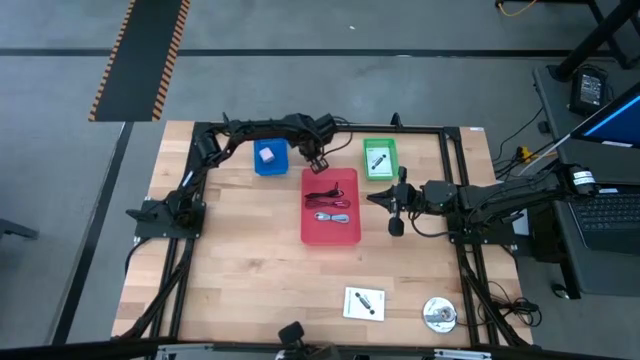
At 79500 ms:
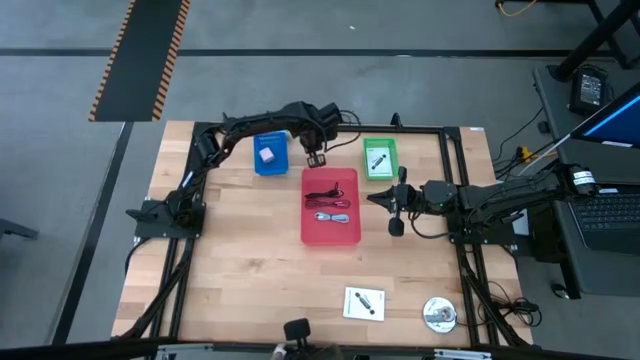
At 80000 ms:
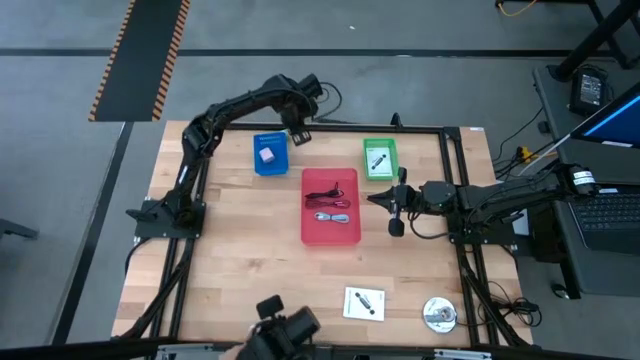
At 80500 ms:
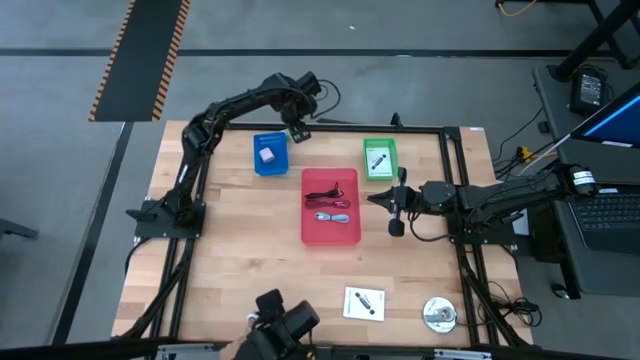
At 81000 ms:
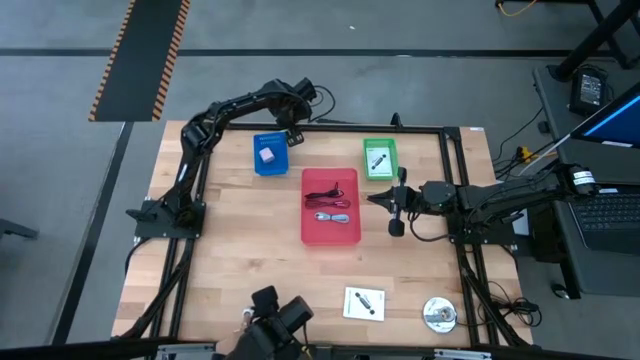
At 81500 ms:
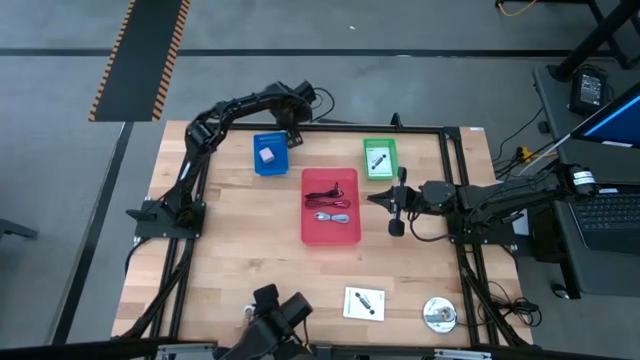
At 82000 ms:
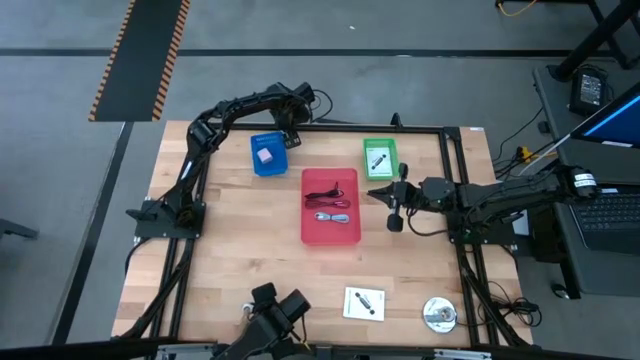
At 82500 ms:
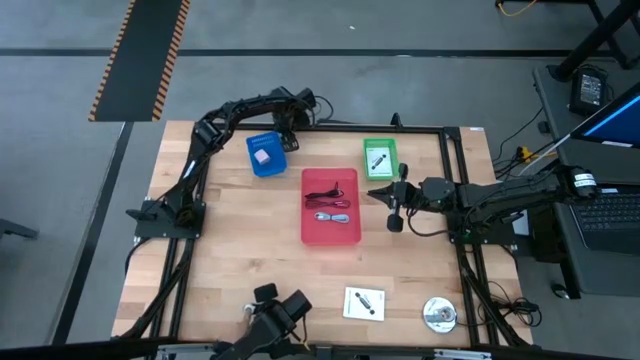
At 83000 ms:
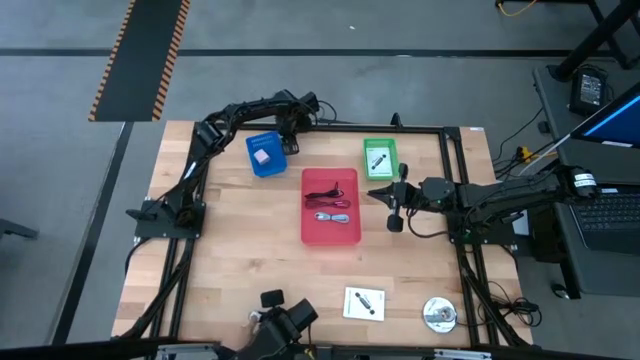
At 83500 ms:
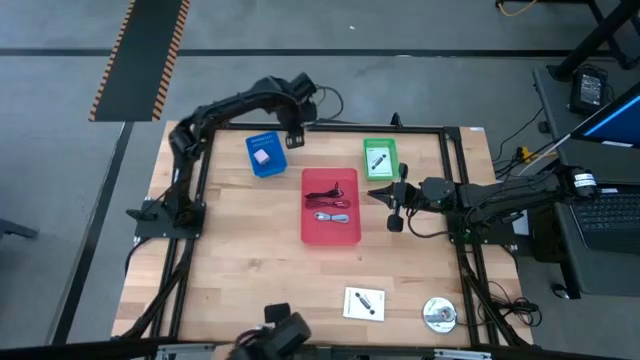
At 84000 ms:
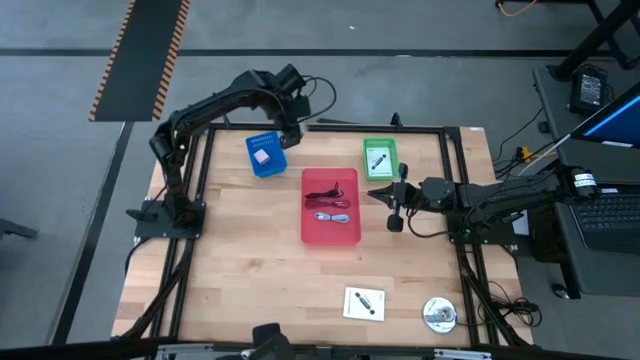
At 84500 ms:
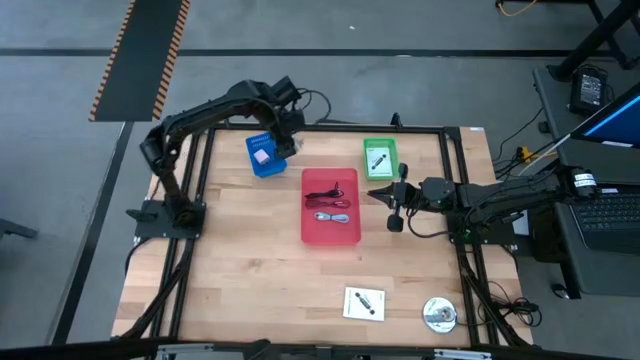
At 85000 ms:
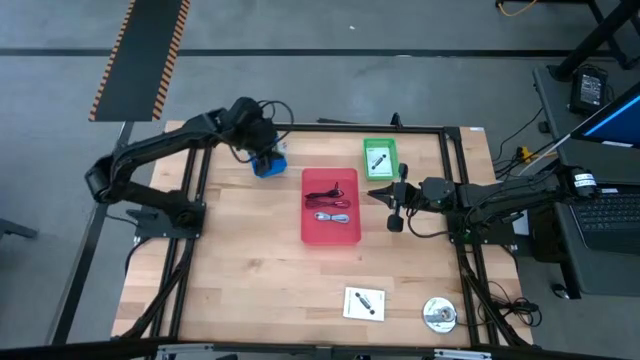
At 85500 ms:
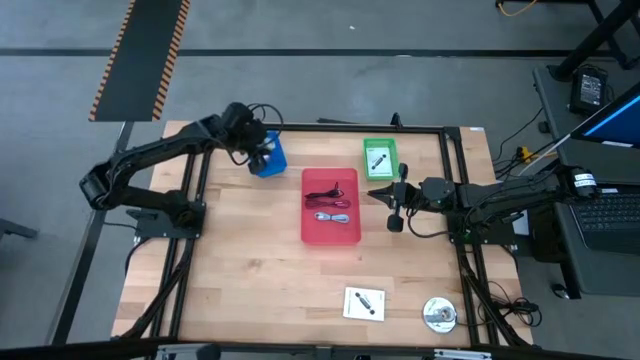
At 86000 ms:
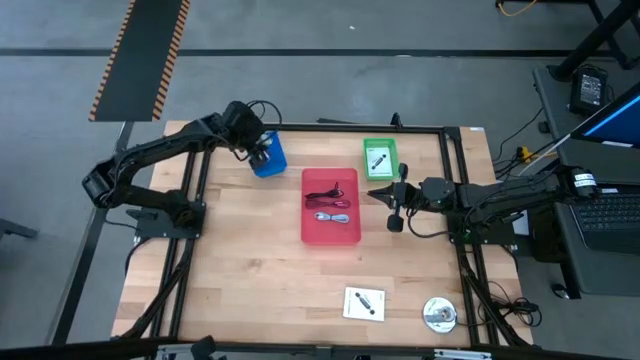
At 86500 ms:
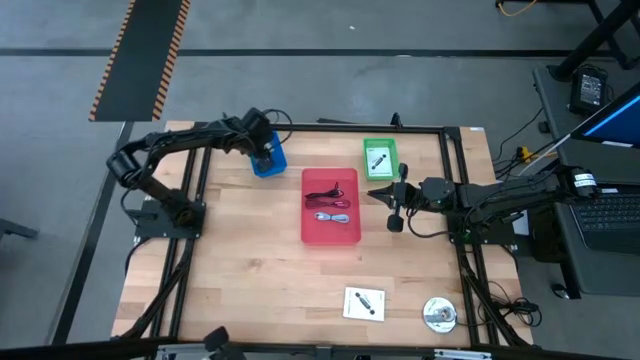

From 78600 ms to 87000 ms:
Task: Pick and place items into bin
Put the green charger adapter into the blue bin

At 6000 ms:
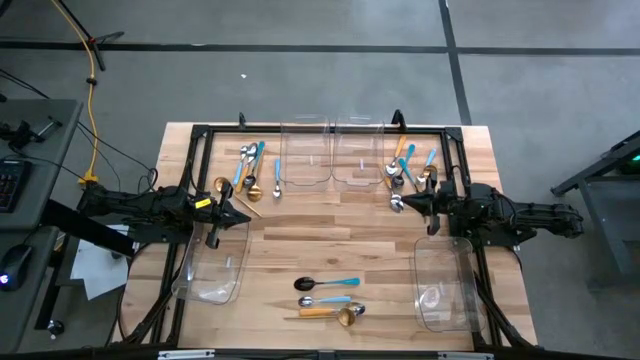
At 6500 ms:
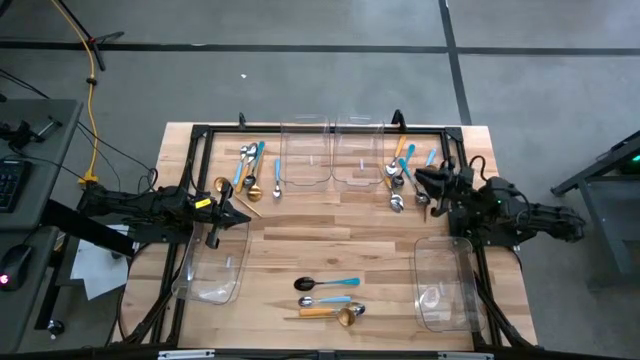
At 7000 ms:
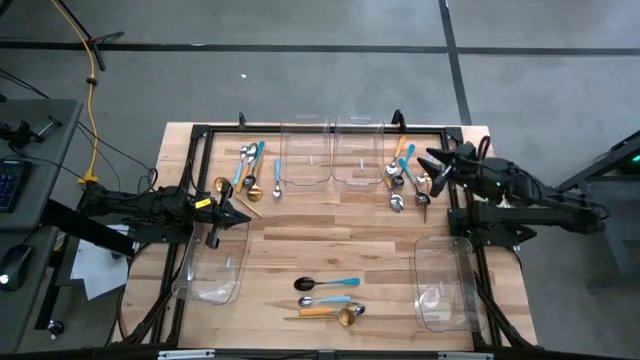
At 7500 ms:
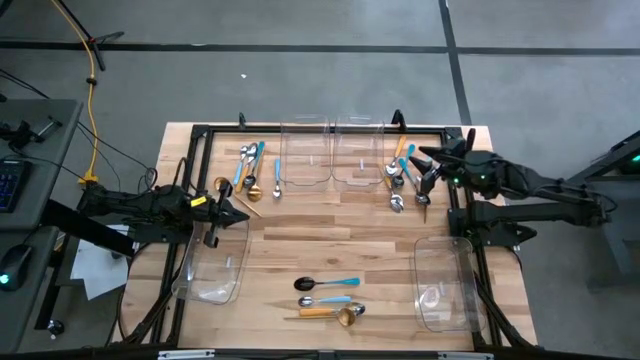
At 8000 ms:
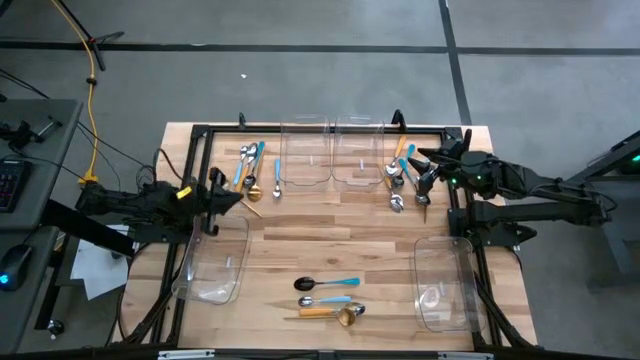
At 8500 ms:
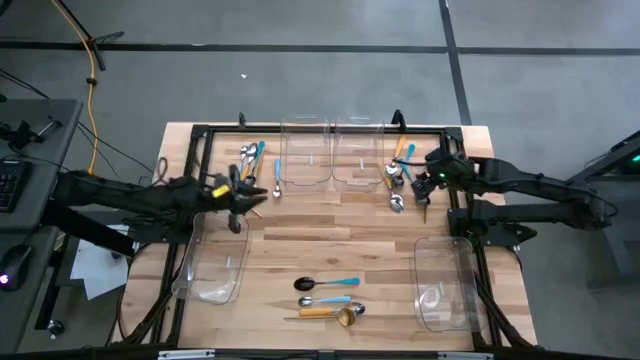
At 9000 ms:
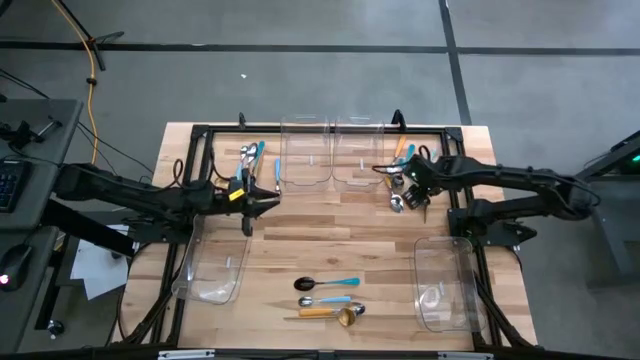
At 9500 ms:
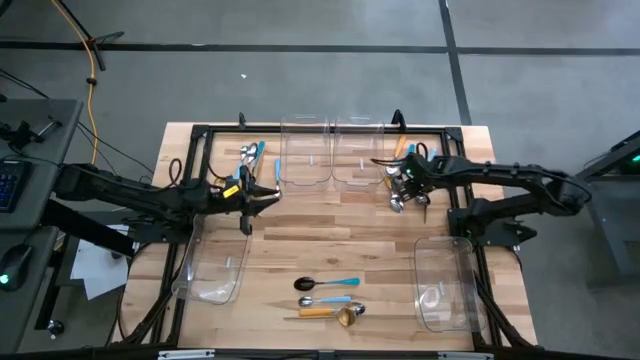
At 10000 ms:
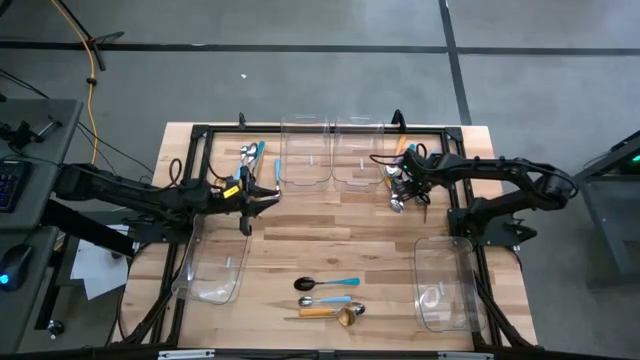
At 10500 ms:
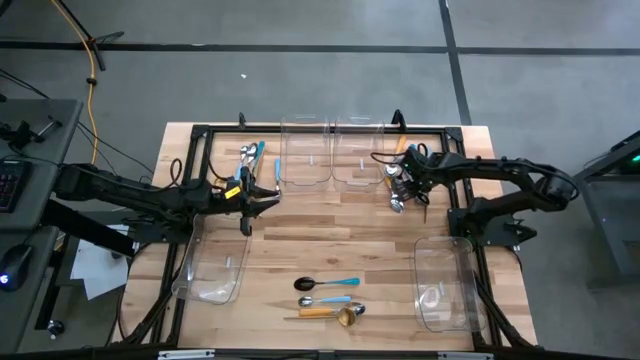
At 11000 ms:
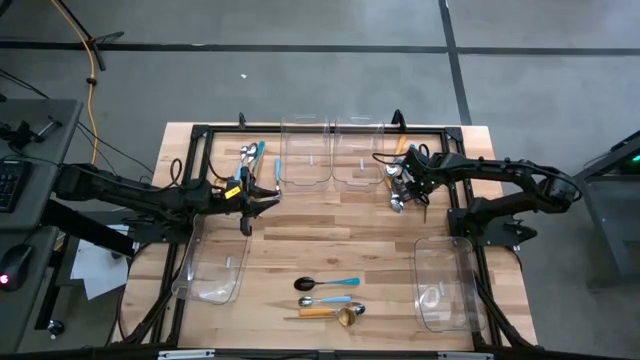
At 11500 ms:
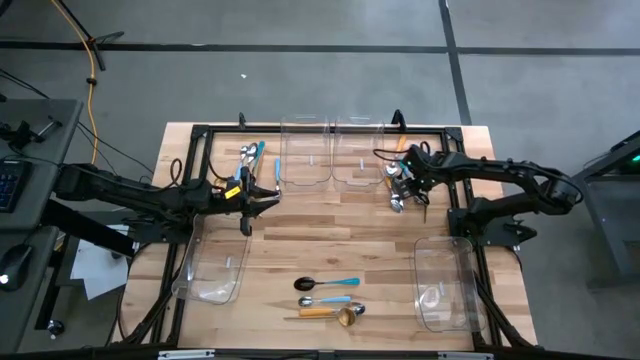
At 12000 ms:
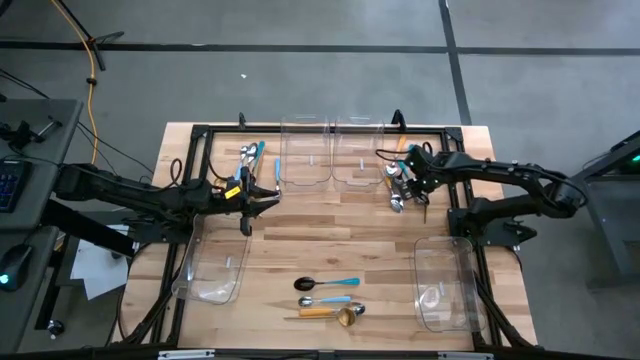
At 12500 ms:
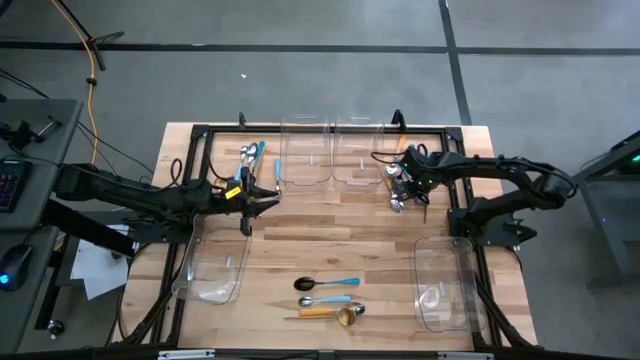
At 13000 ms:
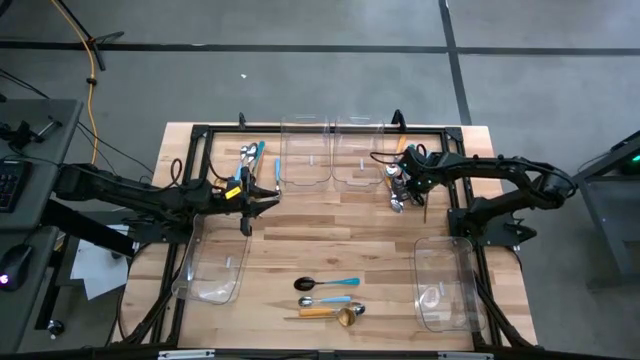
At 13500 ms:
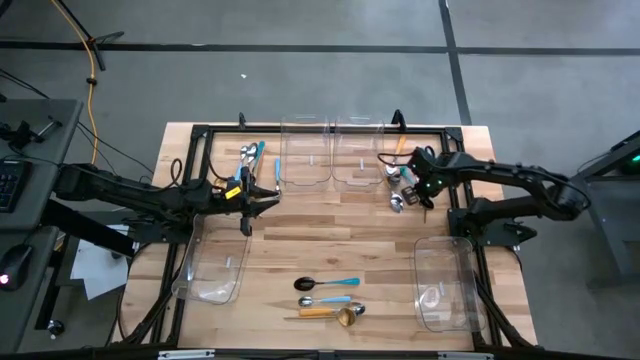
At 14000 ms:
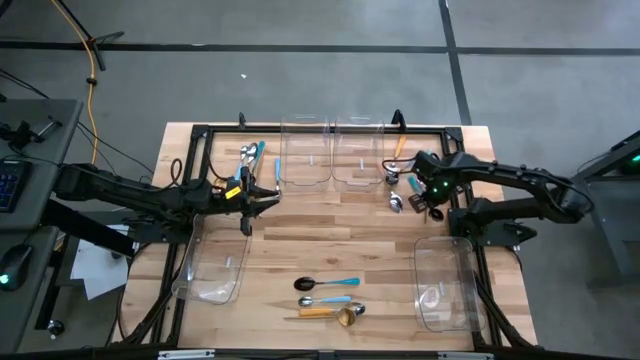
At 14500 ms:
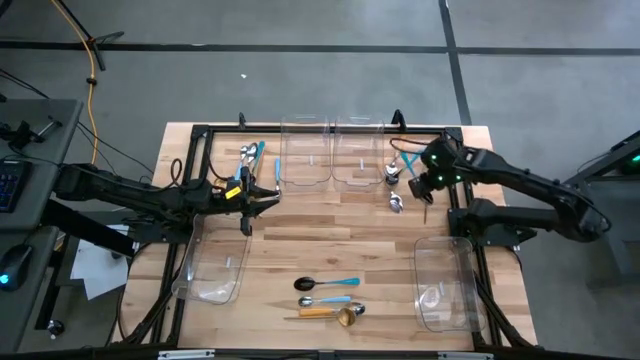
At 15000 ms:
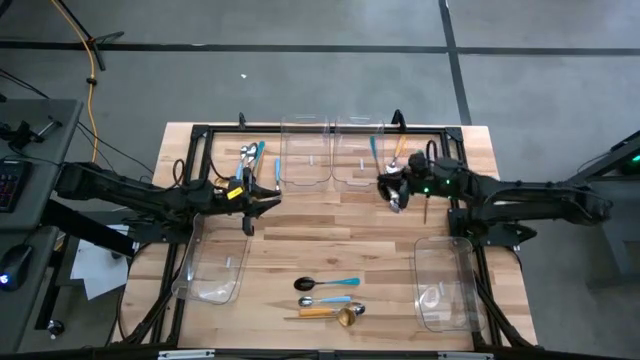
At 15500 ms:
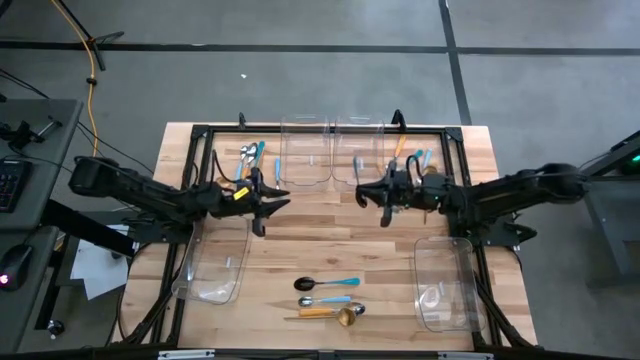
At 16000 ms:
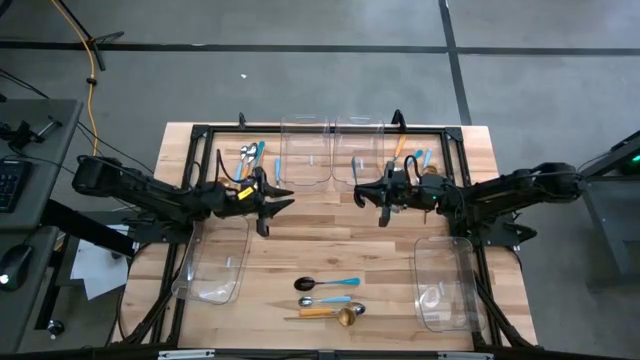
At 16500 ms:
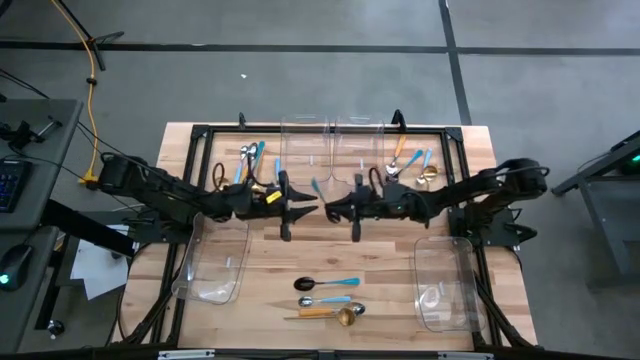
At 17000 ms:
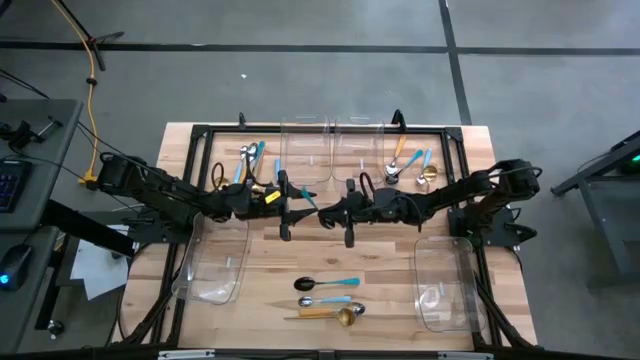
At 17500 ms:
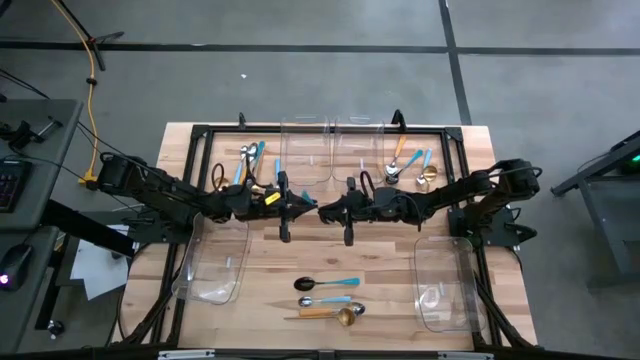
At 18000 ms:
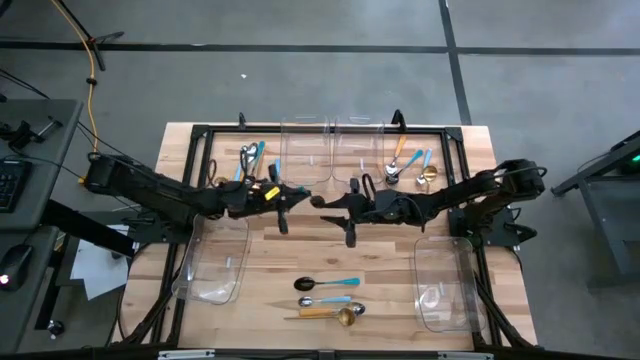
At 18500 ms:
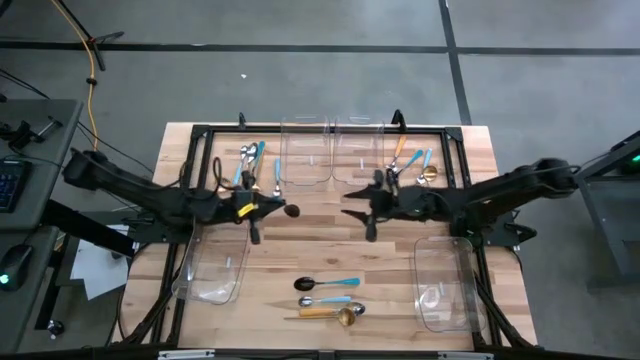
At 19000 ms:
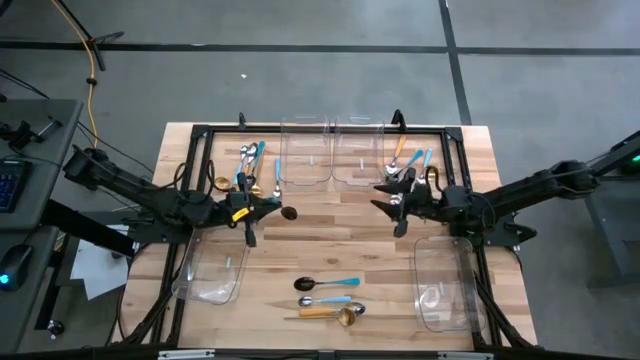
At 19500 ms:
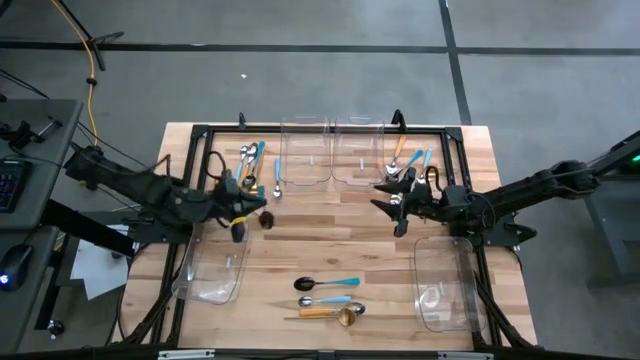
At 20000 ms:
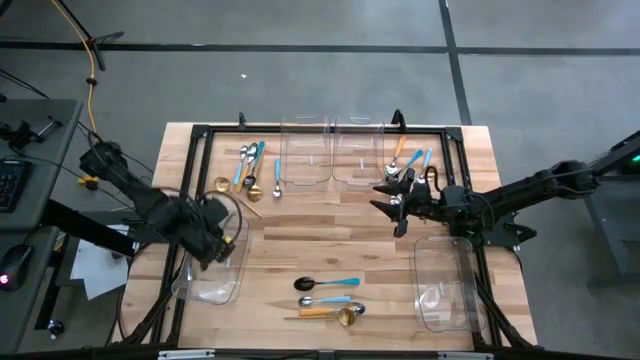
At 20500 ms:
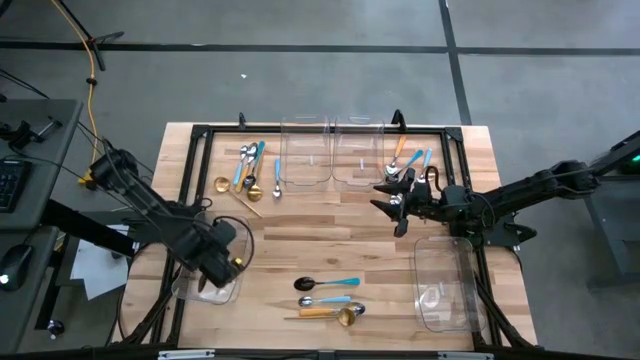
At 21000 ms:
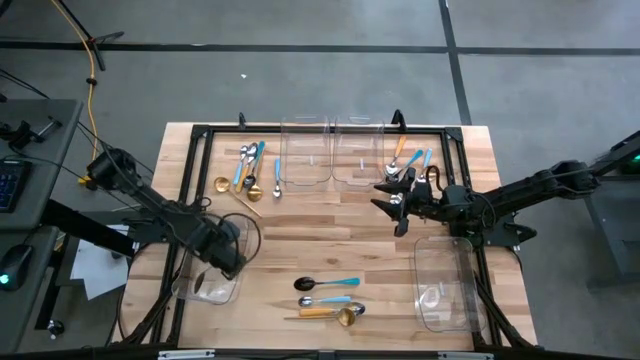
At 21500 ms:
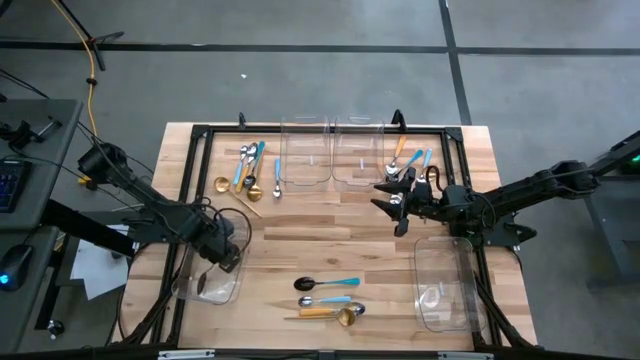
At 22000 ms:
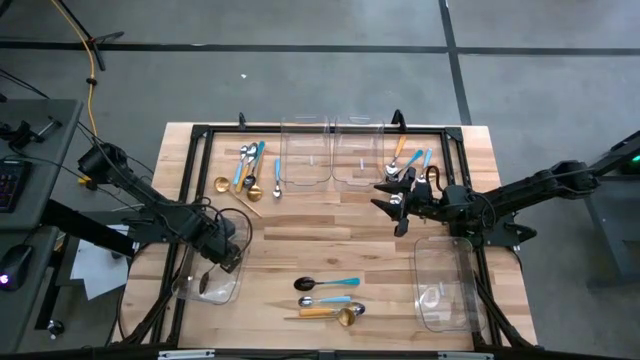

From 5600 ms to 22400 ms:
Task: Sort silverware by color (type)
Put the black spoon into the bottom left transparent bin
